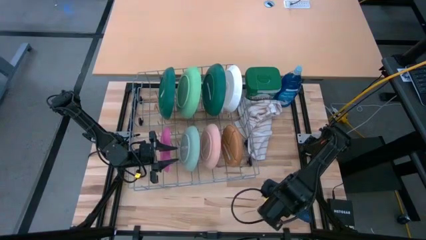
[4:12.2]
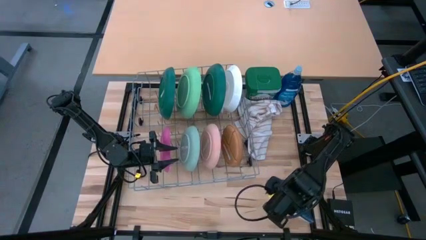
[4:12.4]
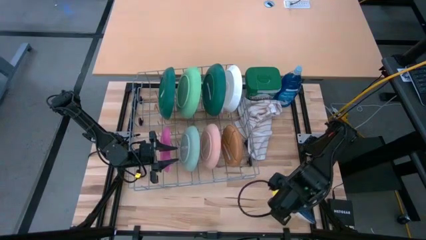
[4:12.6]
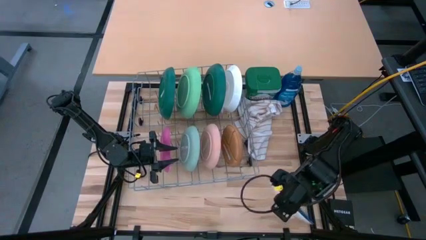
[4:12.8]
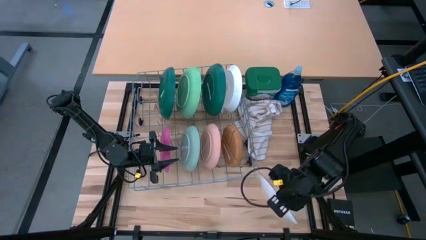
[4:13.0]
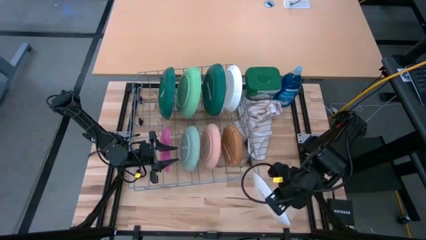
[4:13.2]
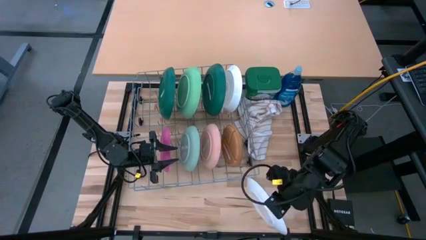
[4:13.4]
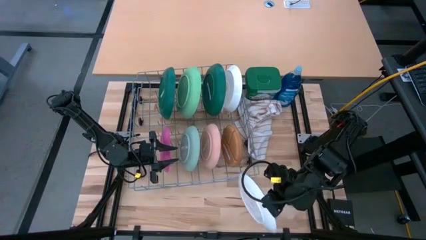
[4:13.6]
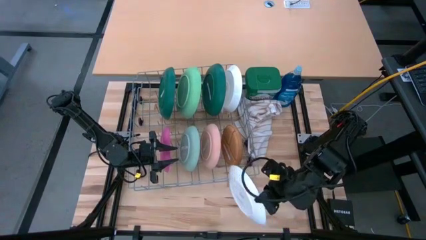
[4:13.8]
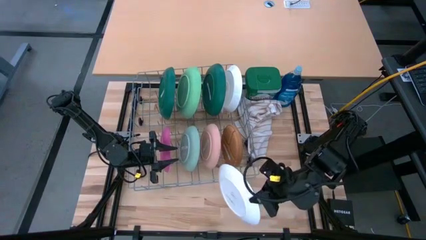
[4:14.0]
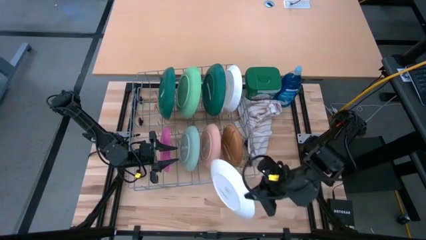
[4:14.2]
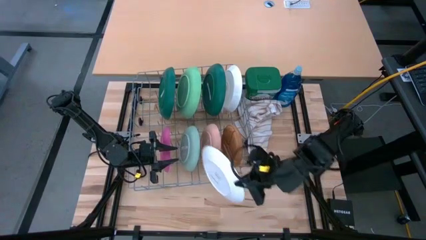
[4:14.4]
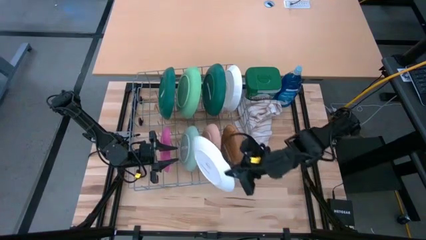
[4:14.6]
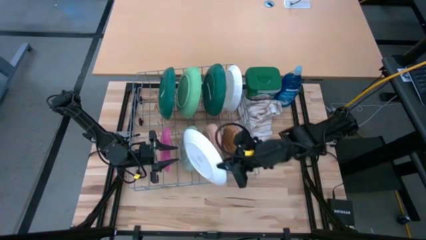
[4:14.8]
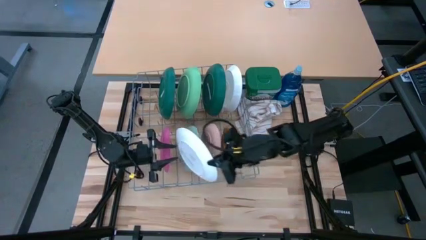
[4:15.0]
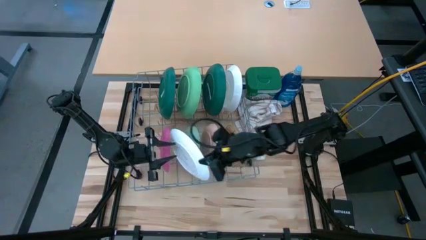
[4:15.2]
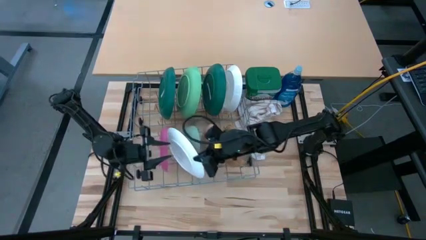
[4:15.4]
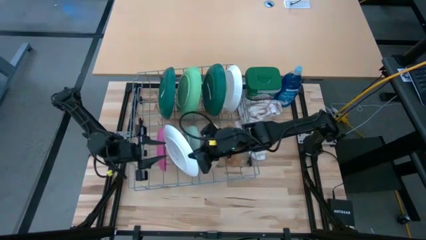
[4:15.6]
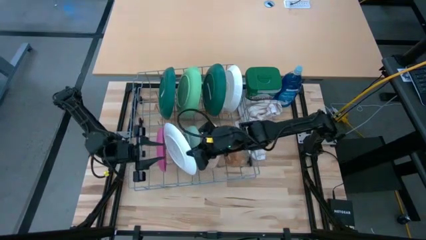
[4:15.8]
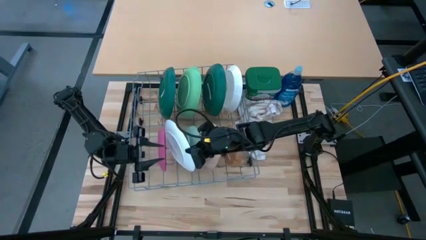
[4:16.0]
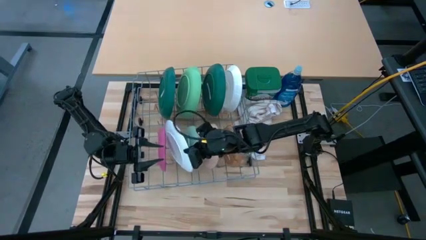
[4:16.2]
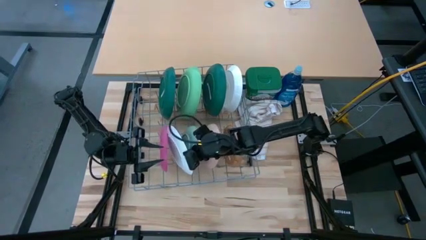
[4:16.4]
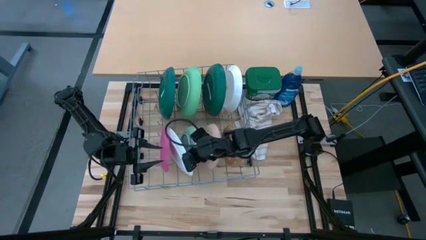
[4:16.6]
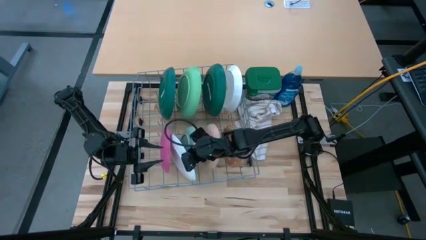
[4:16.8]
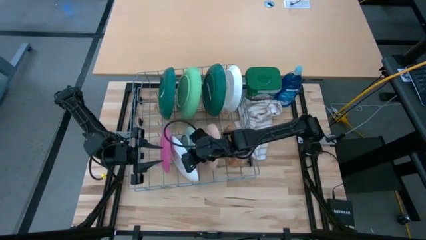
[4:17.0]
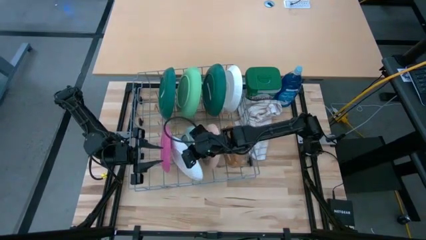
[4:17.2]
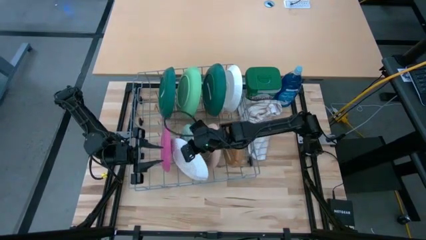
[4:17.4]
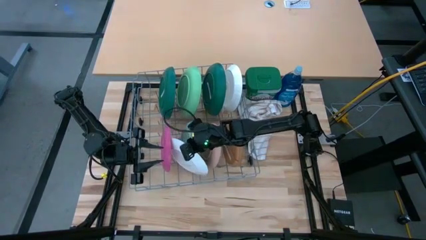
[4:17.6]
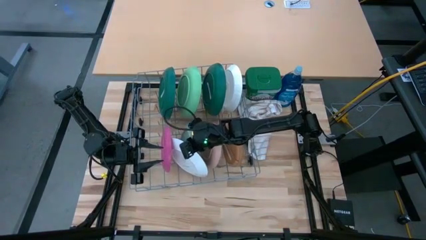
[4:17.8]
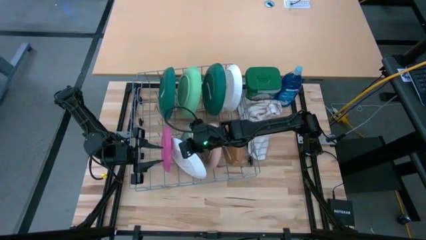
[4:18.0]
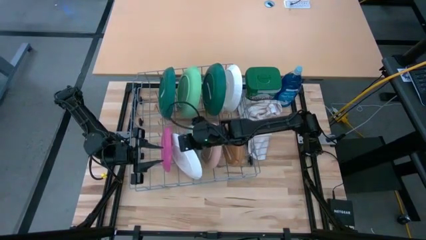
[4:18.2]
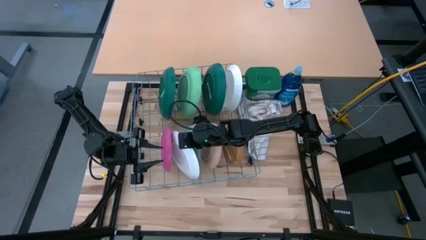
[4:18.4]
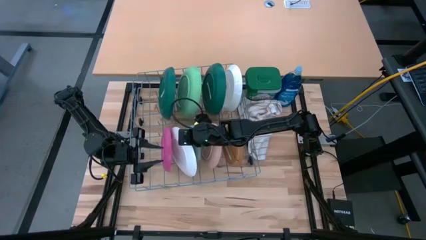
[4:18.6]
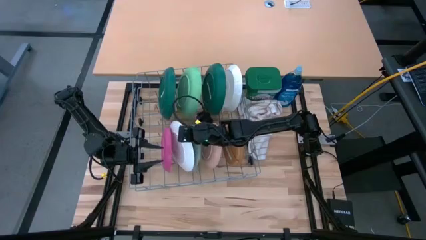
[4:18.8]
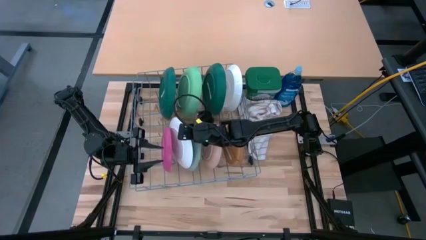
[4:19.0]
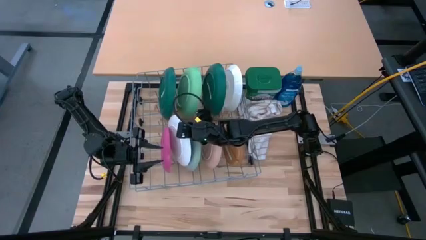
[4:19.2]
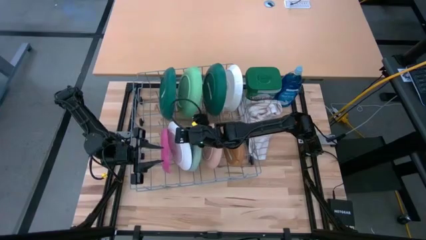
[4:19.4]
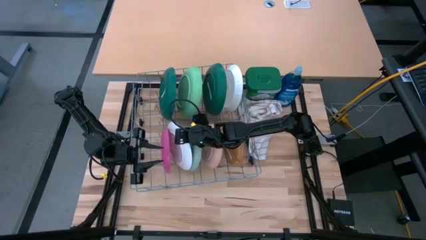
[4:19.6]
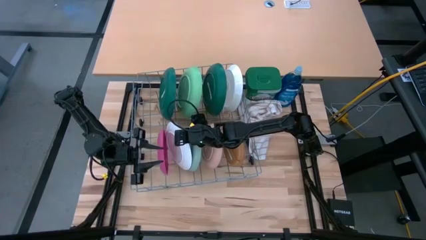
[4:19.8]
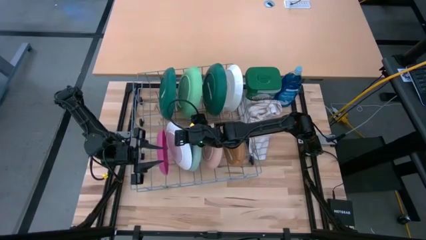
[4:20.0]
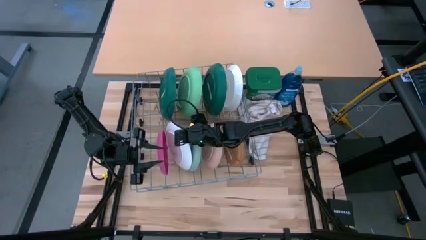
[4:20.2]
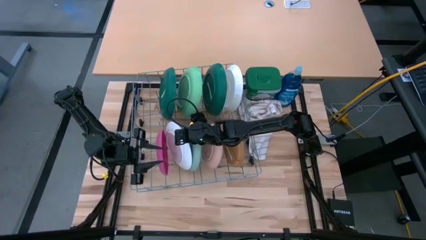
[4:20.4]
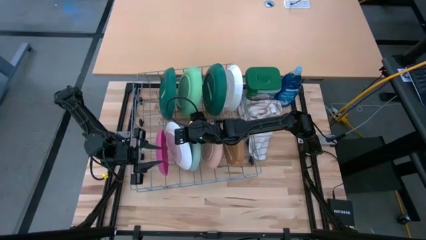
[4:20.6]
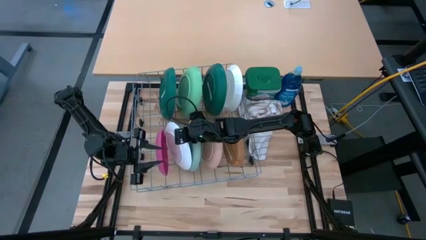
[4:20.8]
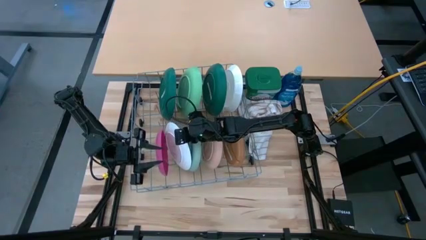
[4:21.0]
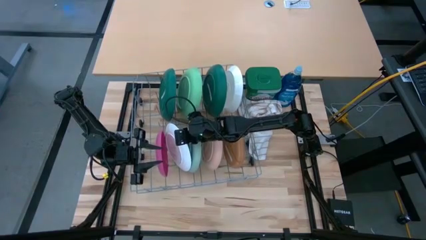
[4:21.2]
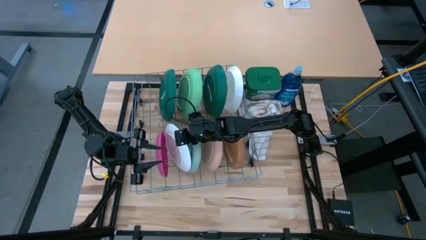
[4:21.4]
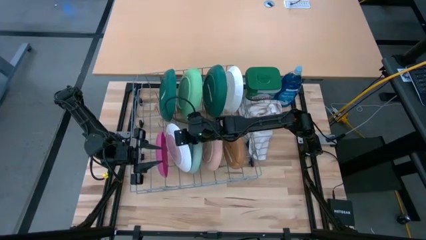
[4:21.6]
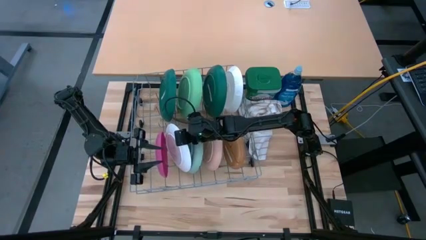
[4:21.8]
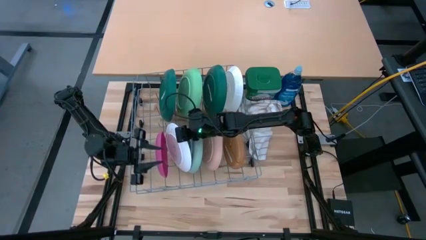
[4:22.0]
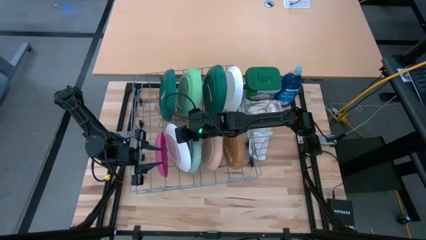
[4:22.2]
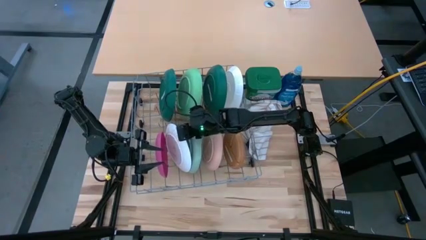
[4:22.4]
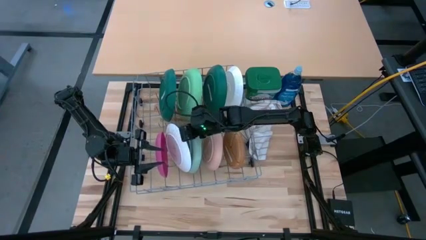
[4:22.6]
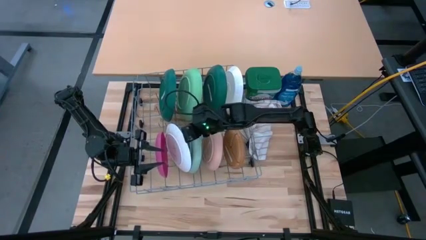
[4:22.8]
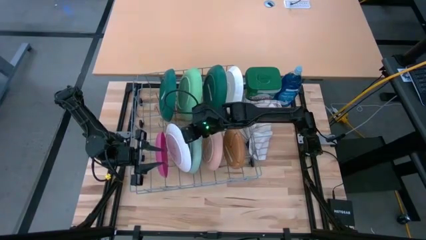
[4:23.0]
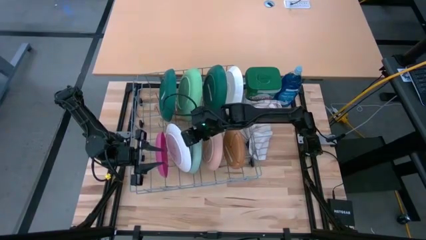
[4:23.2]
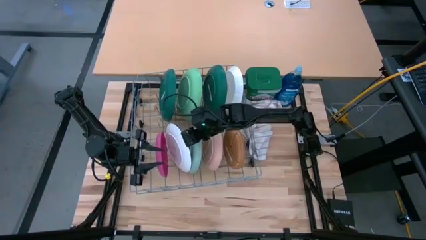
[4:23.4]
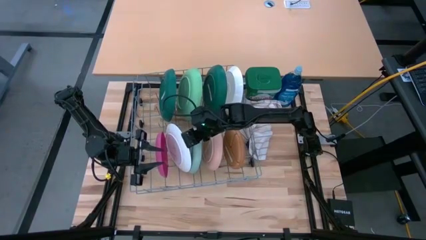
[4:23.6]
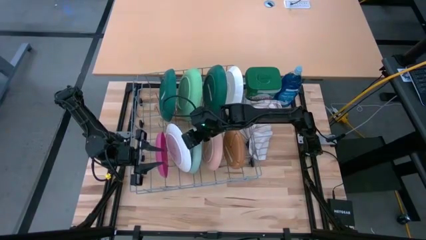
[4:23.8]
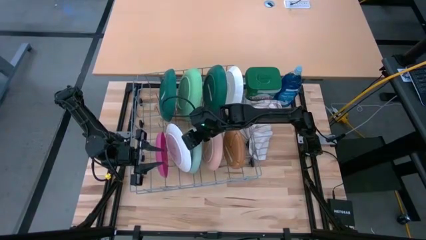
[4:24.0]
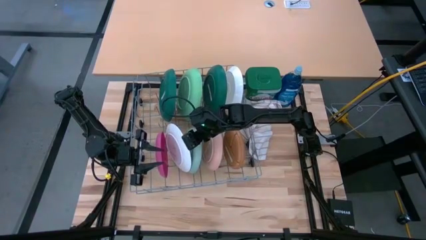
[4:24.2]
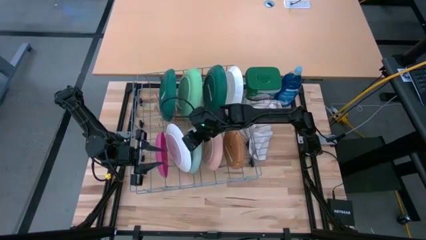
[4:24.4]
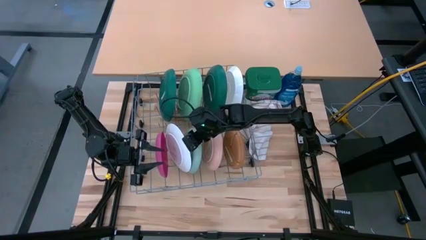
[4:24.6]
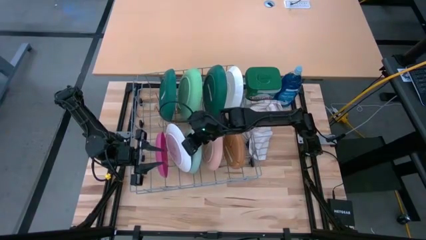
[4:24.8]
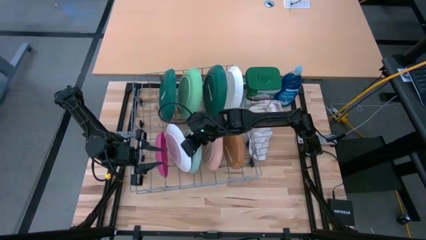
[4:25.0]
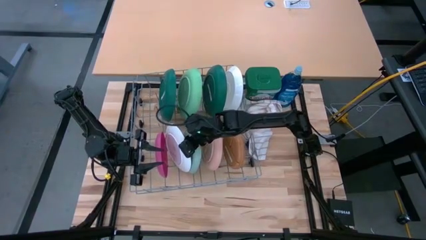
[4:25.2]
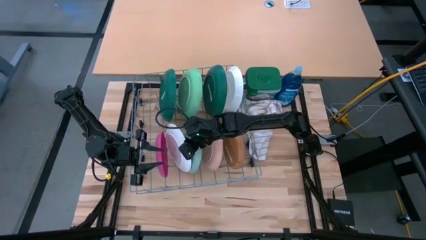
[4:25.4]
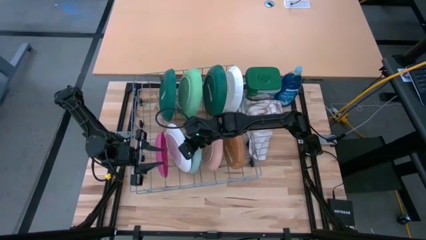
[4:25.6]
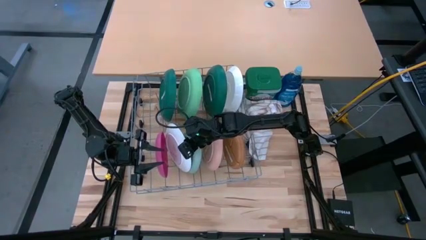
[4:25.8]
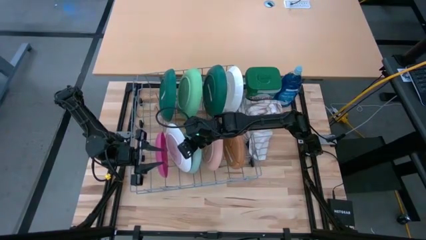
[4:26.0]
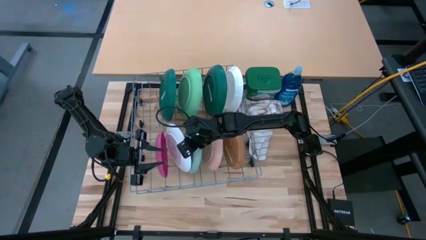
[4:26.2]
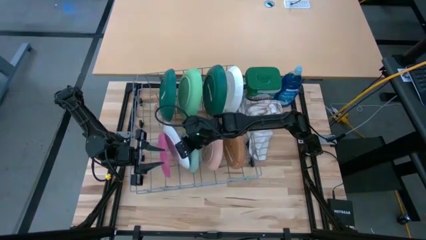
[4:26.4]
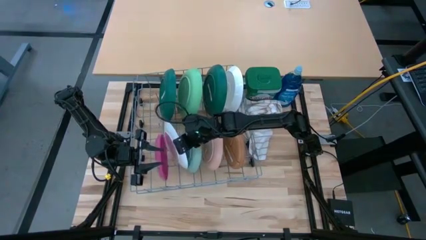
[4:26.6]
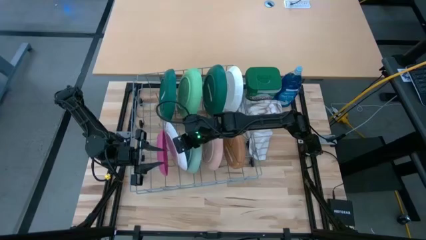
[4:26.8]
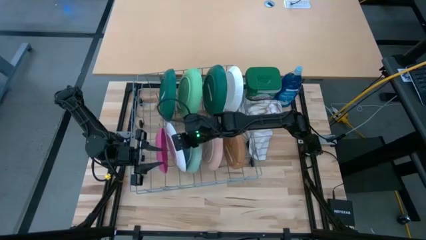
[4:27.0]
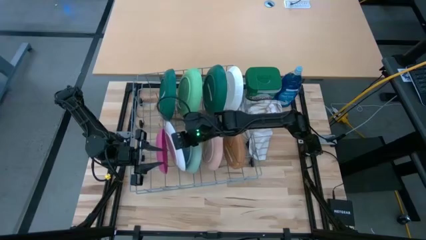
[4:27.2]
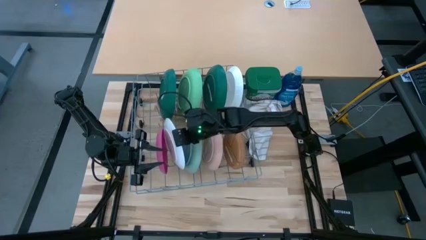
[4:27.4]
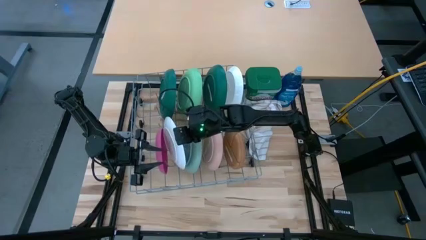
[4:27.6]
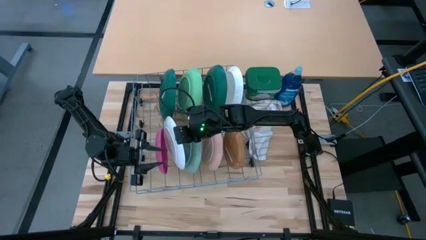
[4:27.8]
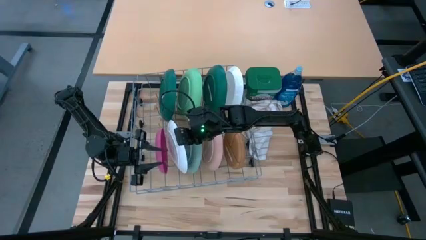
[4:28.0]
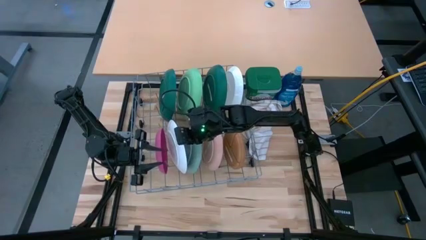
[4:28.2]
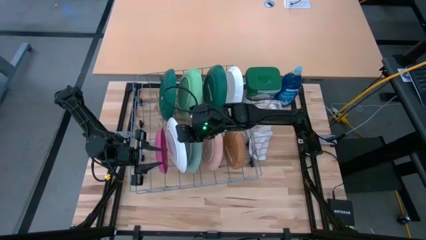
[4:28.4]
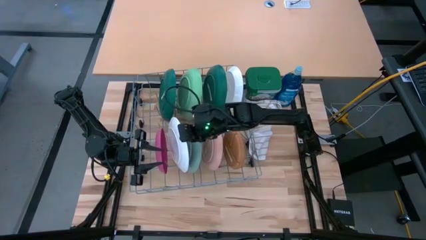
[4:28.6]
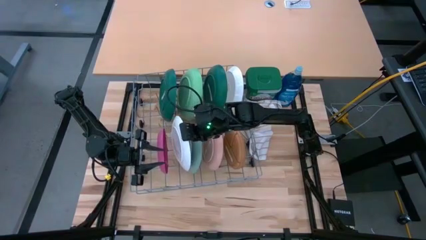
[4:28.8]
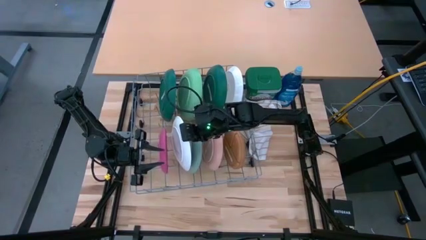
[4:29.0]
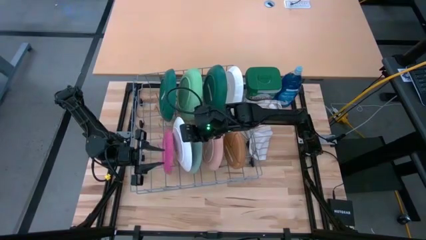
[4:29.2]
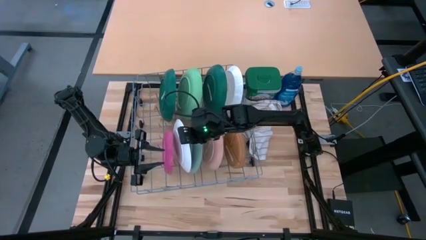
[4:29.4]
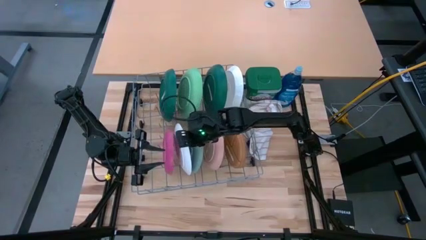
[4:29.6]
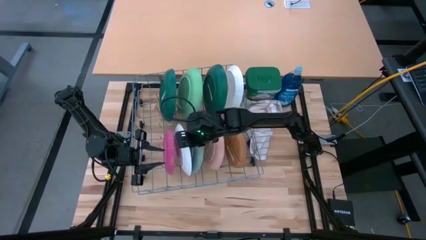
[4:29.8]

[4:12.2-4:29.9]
Task: Sort dishes
Put the blue plate in the dish rack
